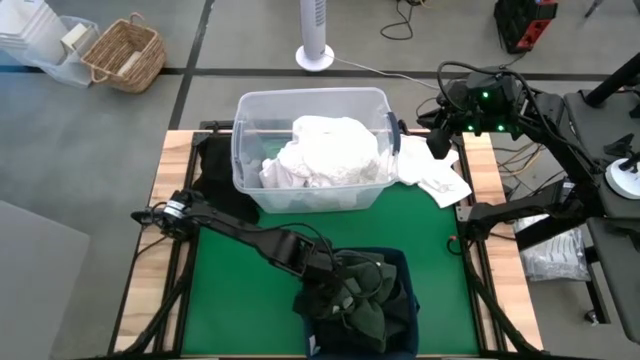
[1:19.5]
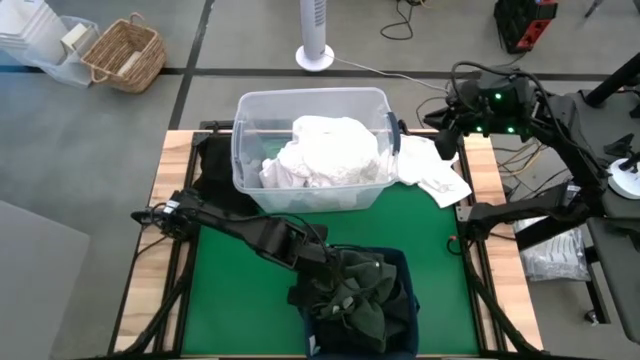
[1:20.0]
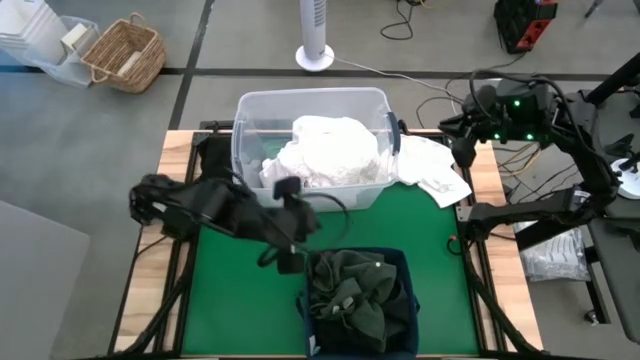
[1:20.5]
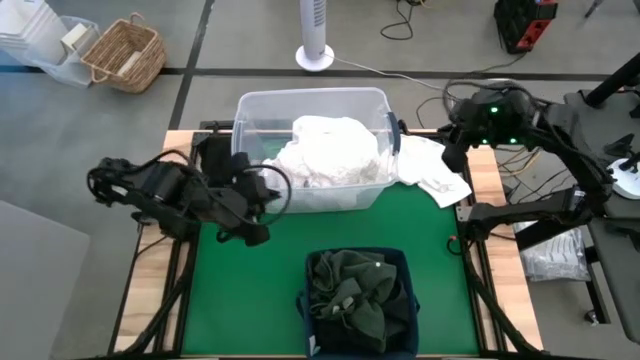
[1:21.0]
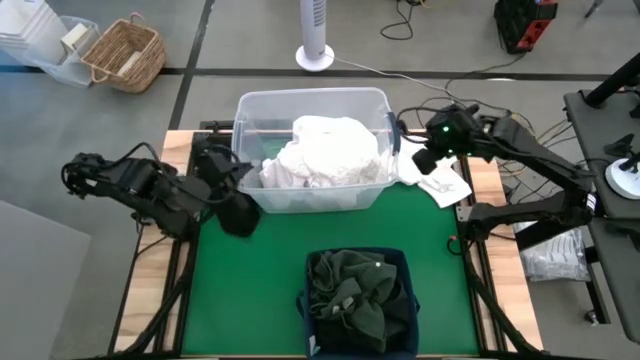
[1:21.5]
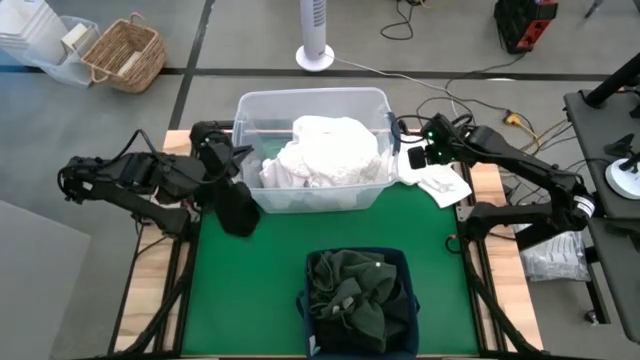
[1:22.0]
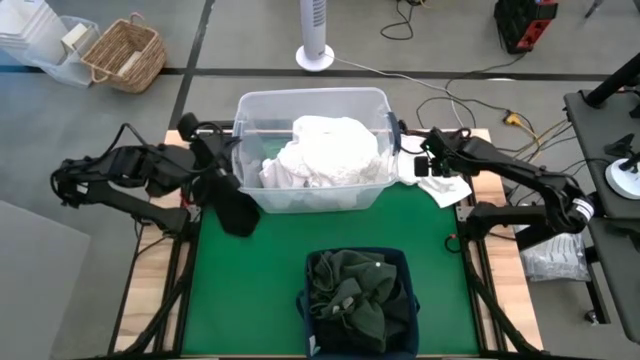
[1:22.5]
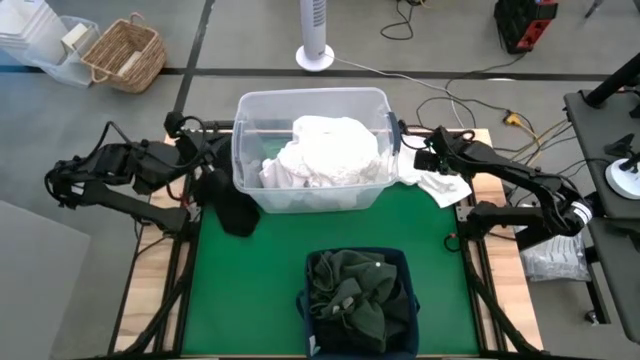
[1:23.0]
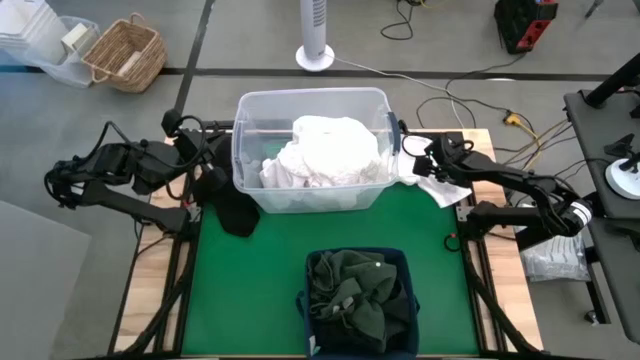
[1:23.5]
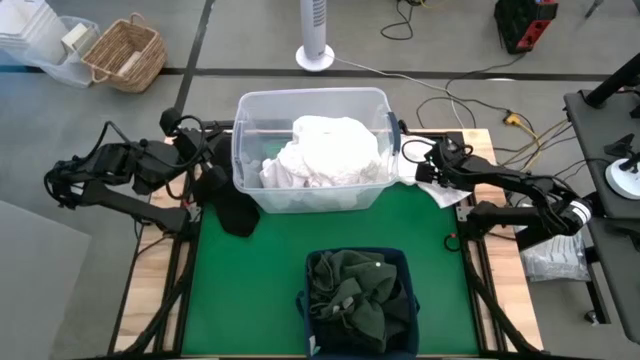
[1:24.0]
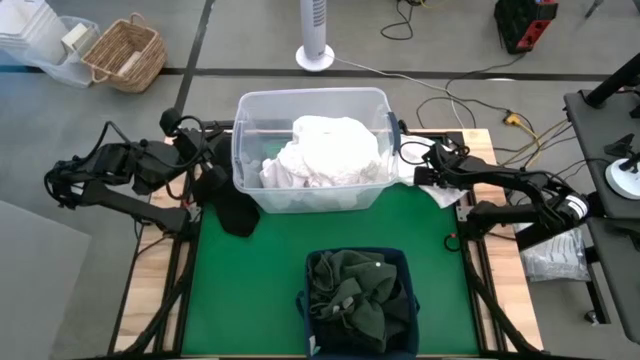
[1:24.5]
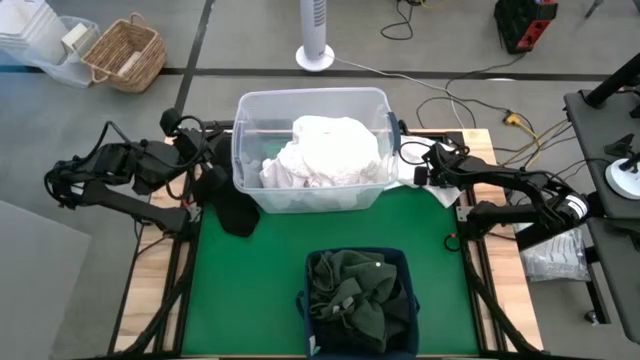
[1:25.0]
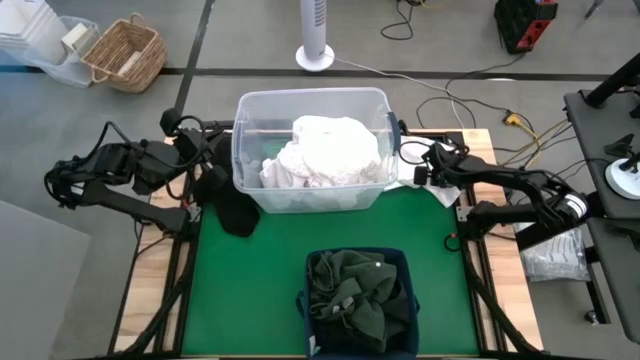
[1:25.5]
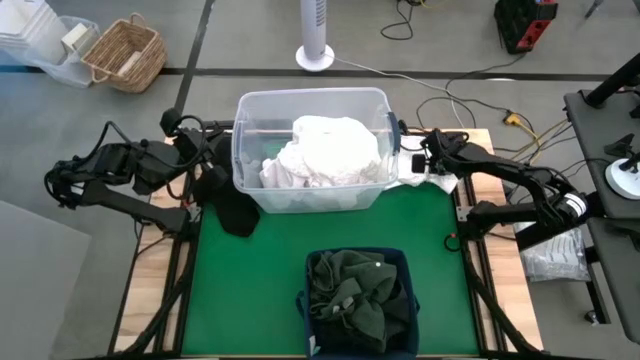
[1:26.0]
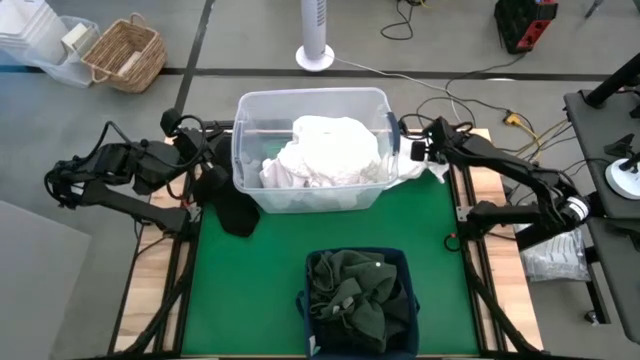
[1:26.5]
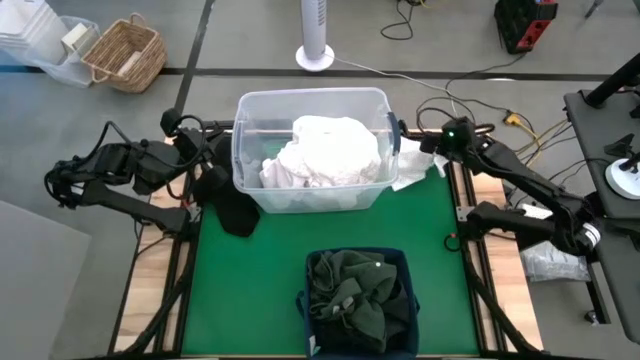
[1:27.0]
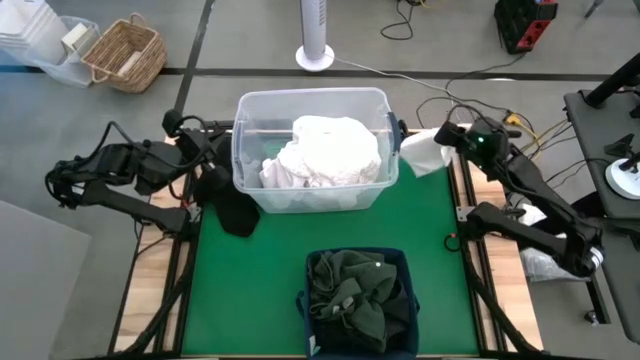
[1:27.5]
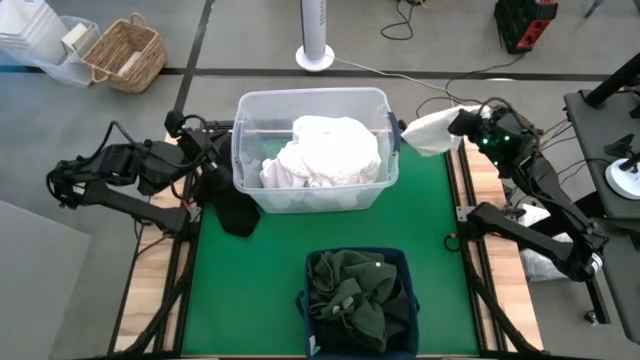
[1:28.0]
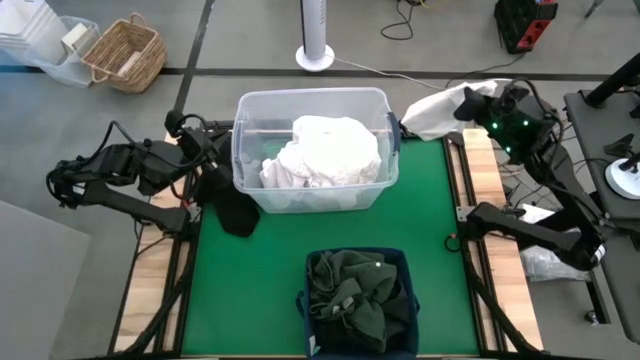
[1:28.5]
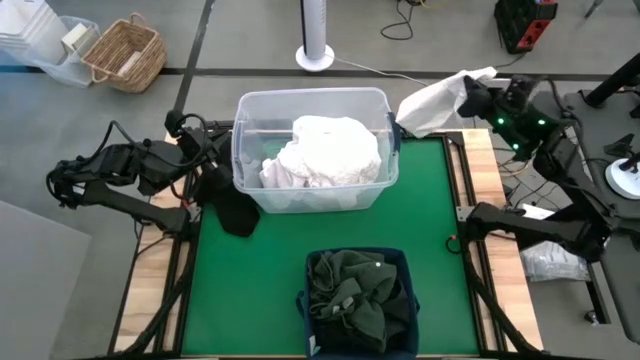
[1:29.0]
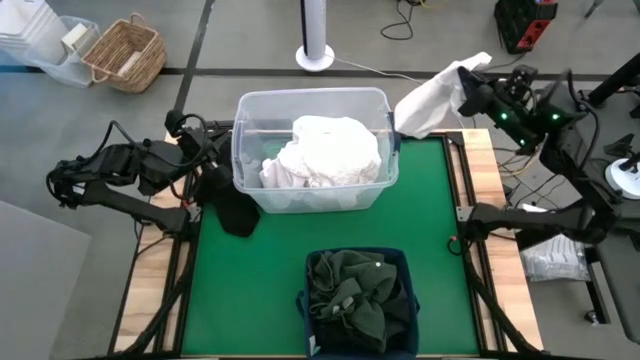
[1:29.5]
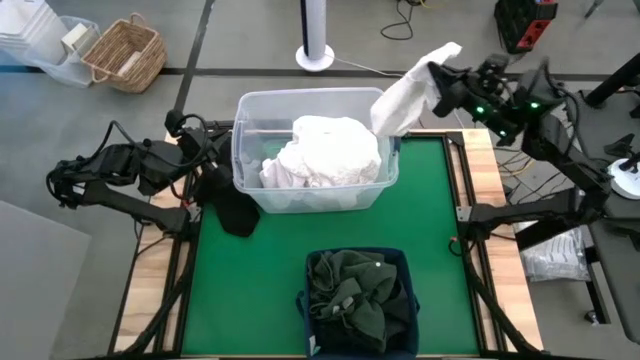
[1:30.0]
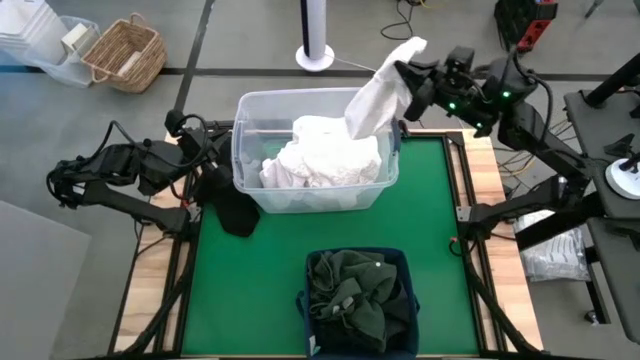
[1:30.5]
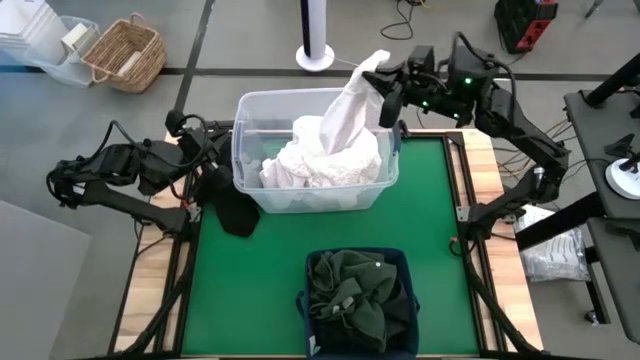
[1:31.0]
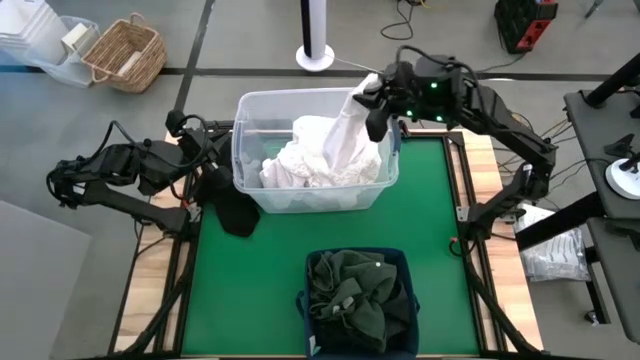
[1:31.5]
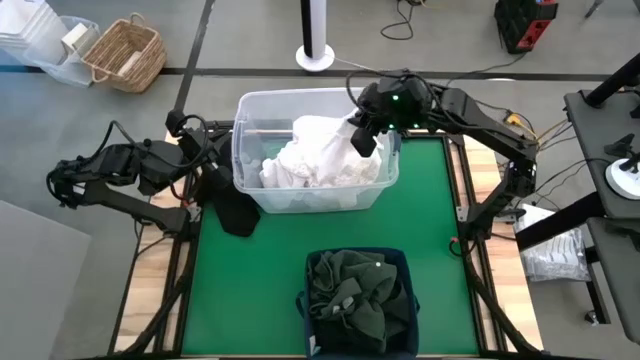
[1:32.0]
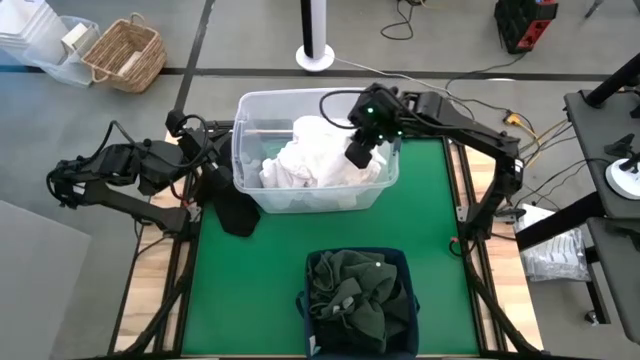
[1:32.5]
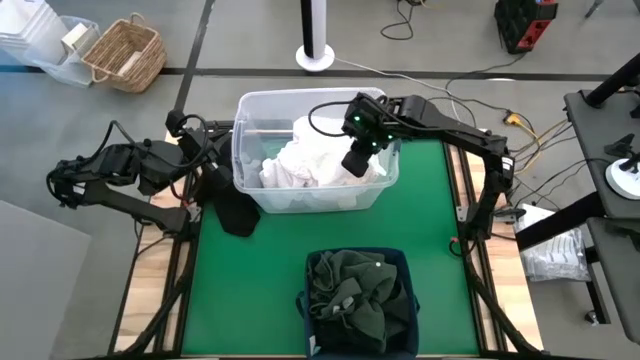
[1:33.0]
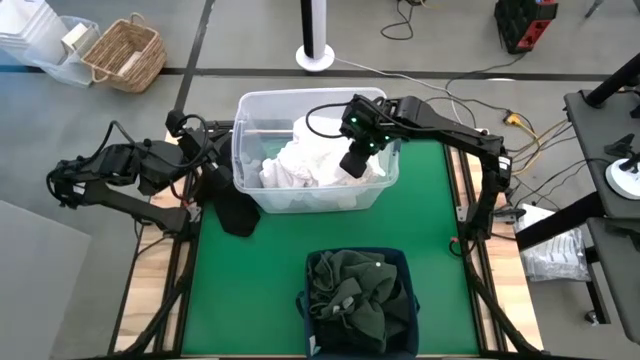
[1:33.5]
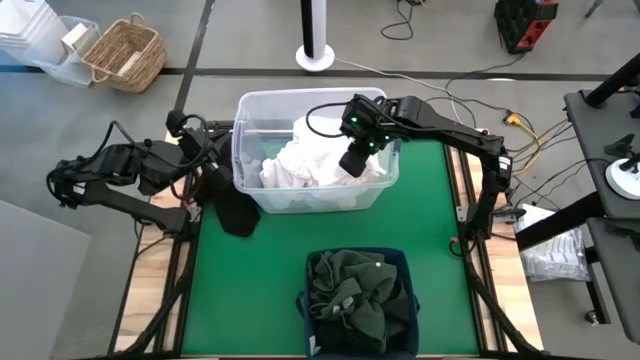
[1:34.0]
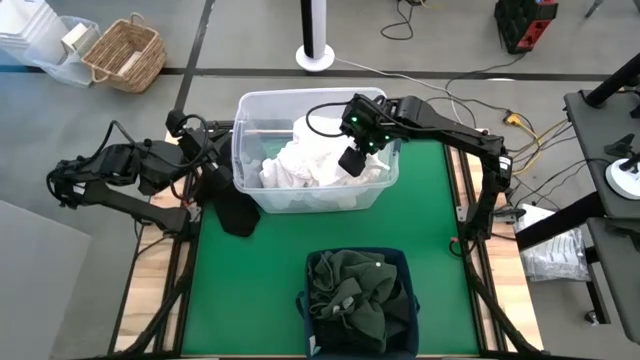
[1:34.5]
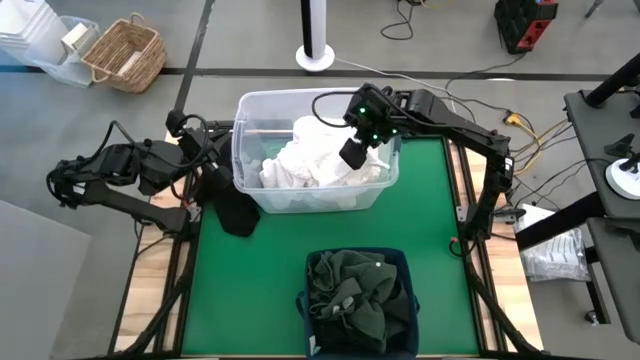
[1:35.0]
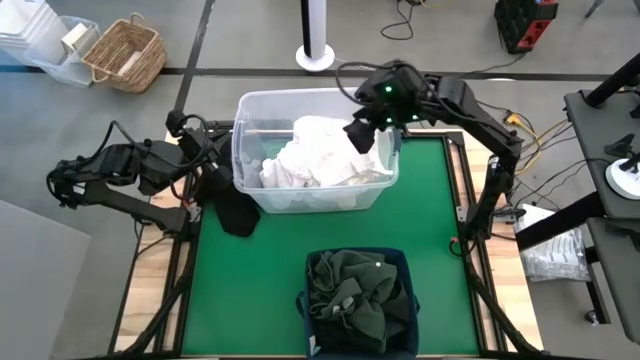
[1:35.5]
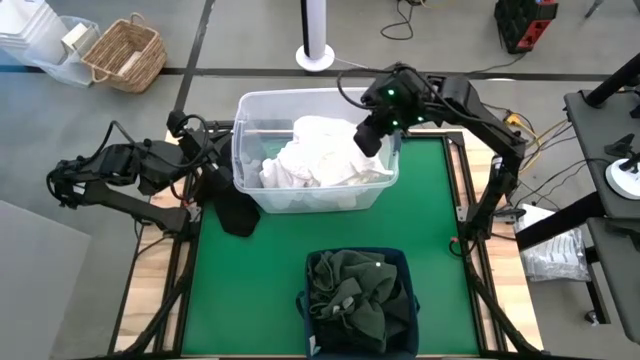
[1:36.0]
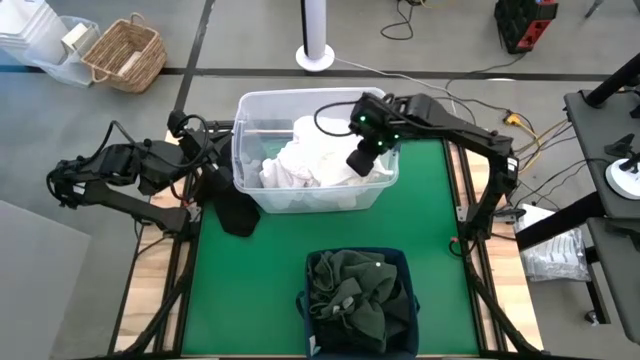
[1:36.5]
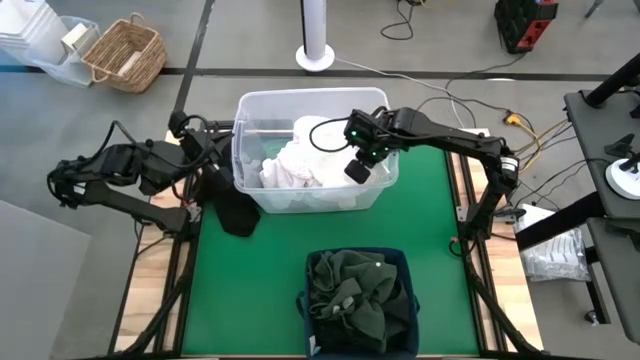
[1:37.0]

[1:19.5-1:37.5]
Put the white underwear into the transparent laundry bin

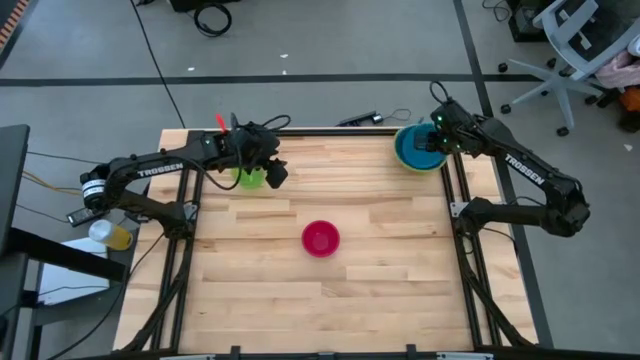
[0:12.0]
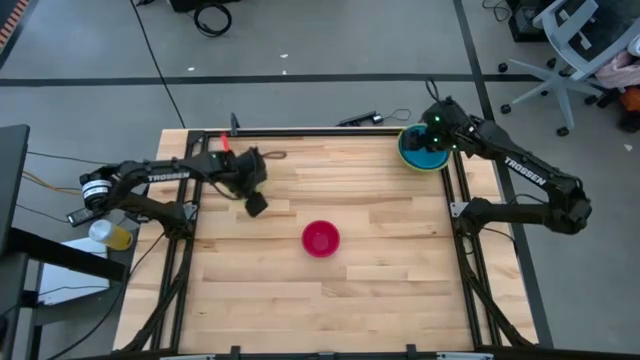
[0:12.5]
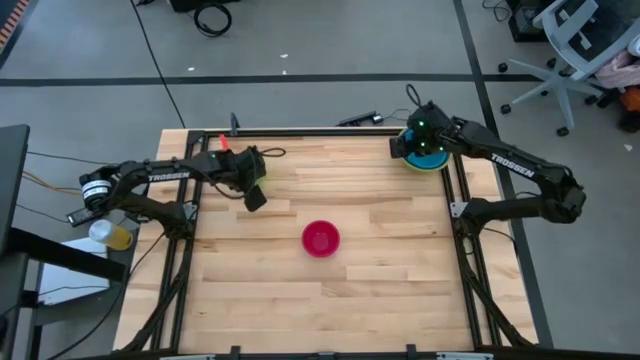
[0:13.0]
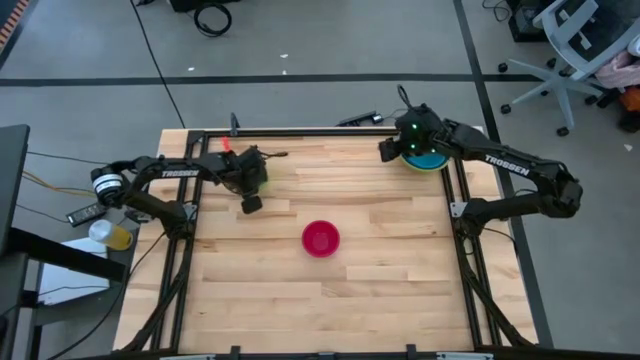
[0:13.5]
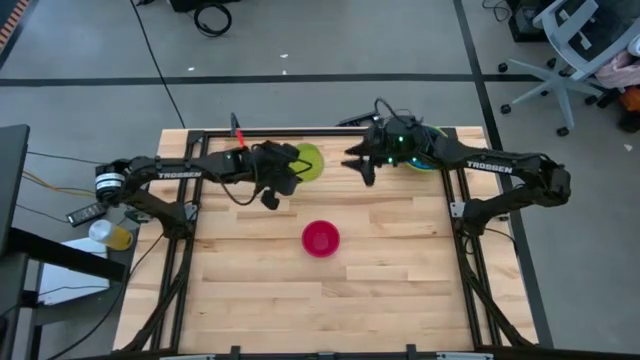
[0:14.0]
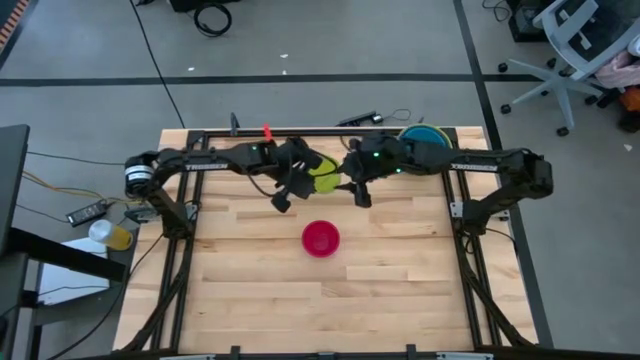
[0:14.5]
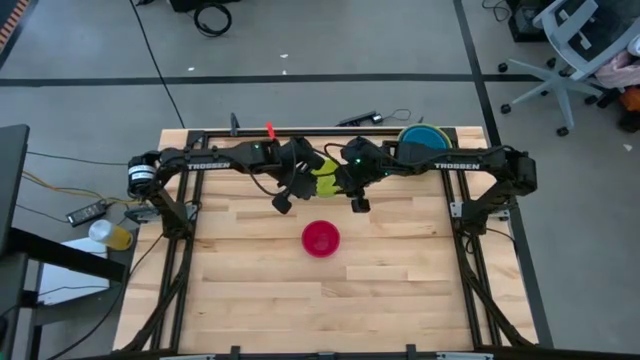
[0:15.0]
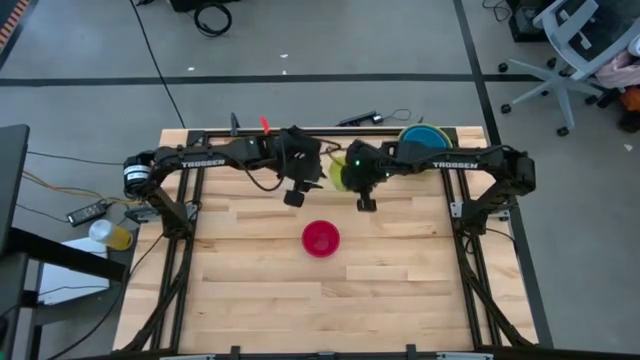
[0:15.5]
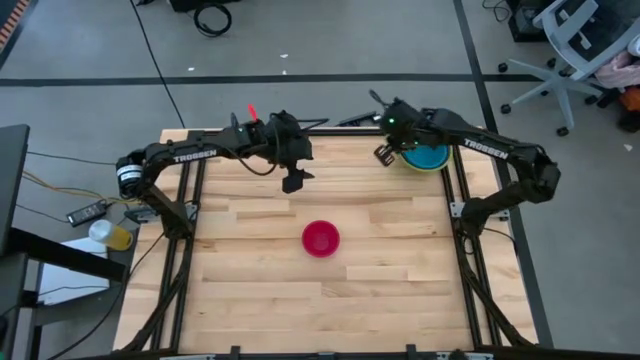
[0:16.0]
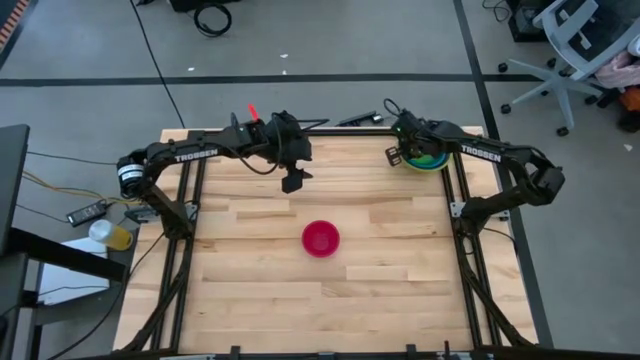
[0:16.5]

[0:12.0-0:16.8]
Stack the small green bowl on top of the blue bowl
